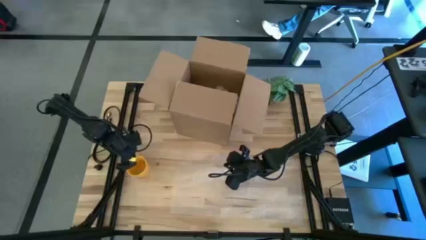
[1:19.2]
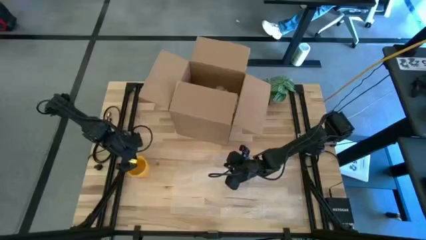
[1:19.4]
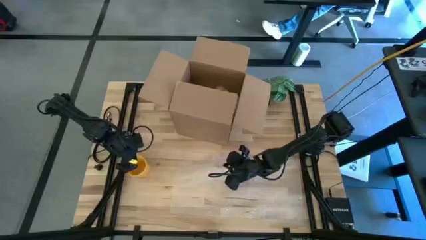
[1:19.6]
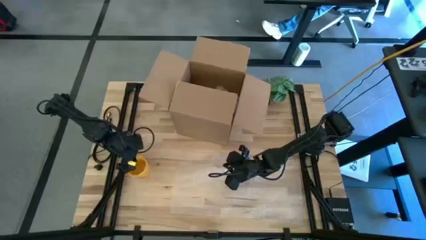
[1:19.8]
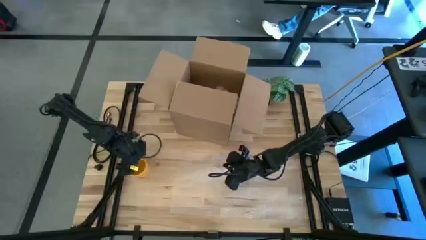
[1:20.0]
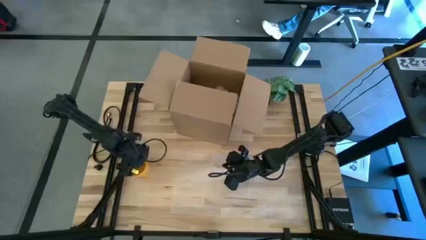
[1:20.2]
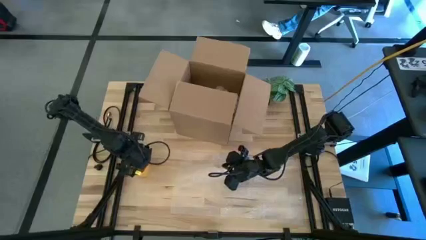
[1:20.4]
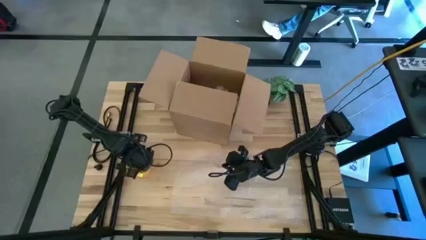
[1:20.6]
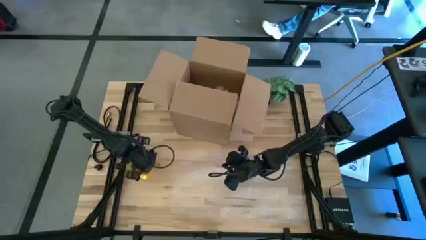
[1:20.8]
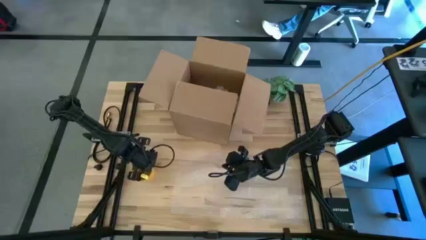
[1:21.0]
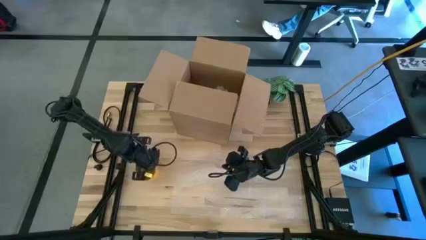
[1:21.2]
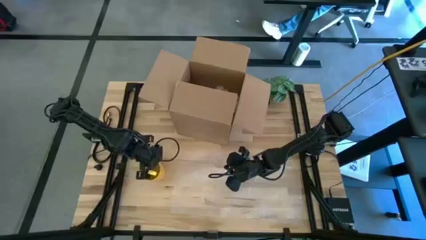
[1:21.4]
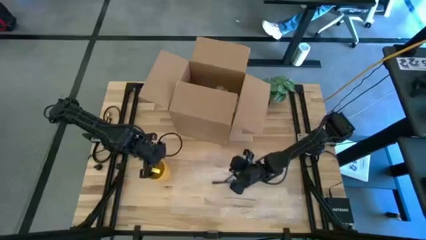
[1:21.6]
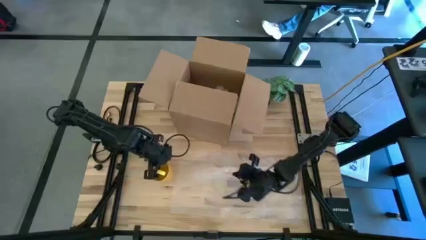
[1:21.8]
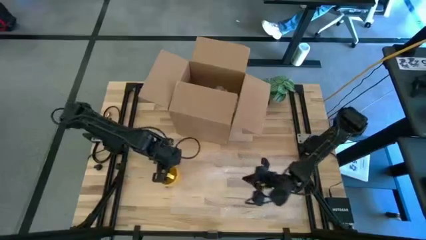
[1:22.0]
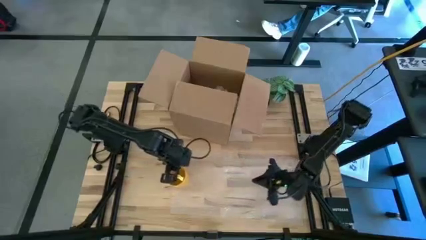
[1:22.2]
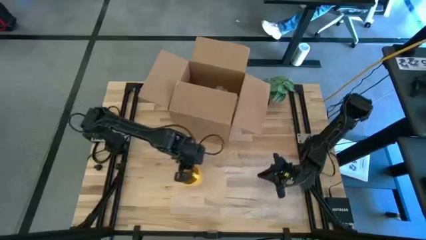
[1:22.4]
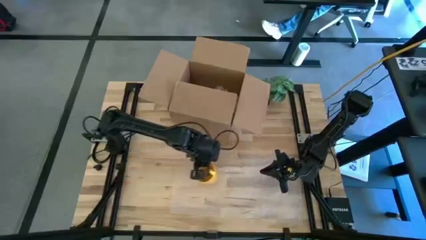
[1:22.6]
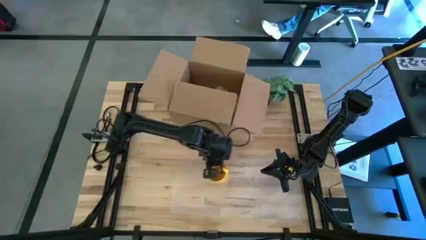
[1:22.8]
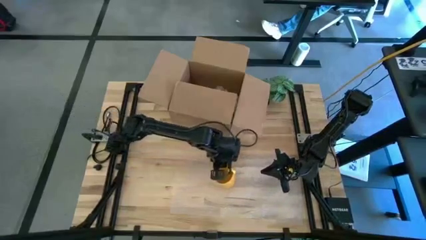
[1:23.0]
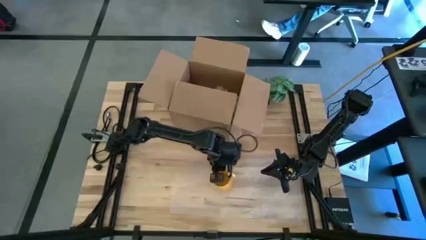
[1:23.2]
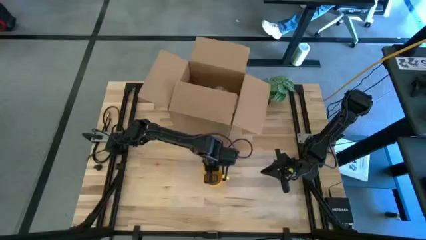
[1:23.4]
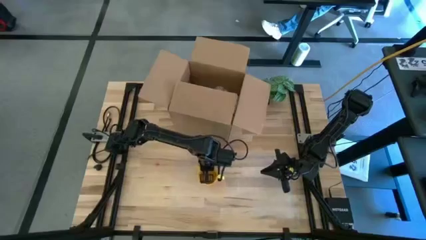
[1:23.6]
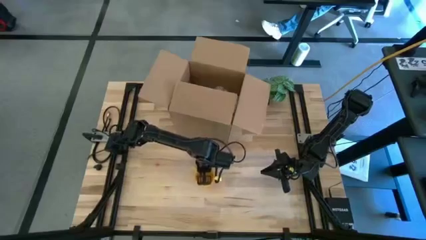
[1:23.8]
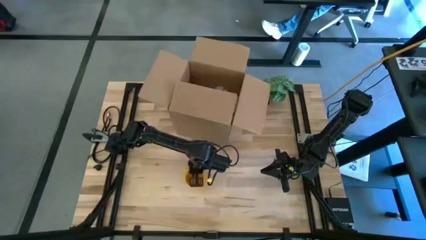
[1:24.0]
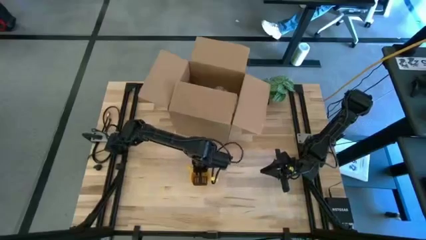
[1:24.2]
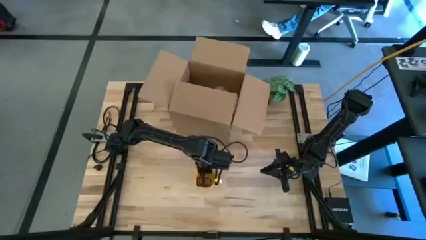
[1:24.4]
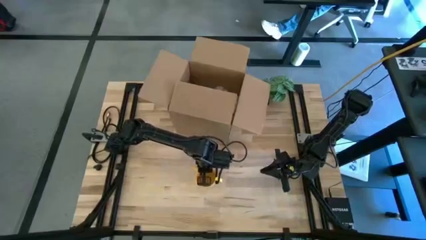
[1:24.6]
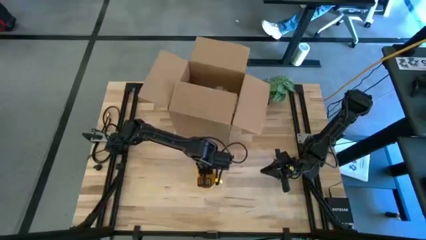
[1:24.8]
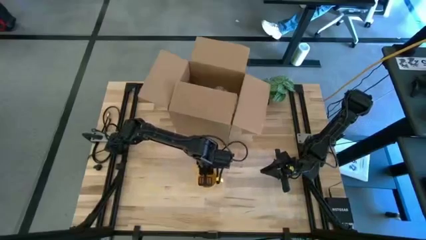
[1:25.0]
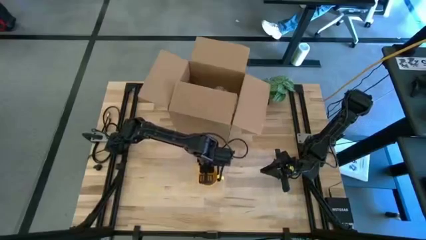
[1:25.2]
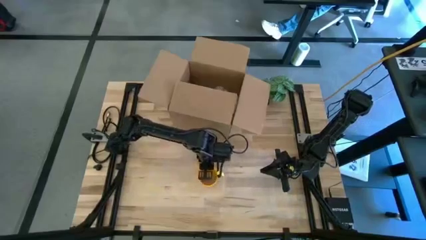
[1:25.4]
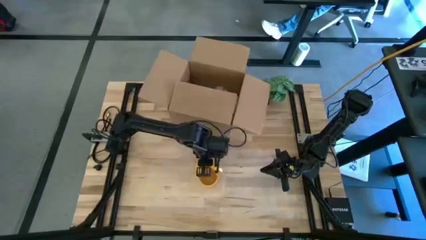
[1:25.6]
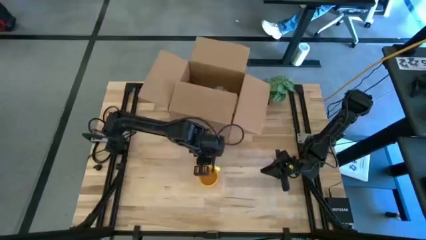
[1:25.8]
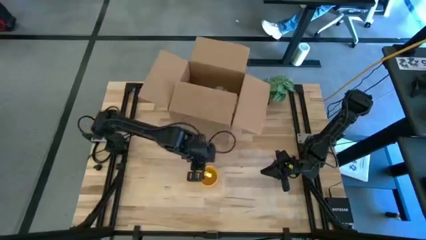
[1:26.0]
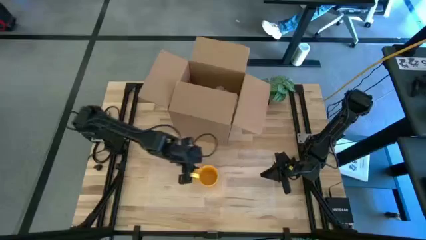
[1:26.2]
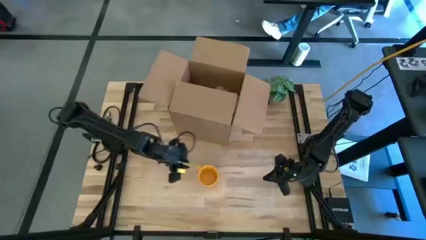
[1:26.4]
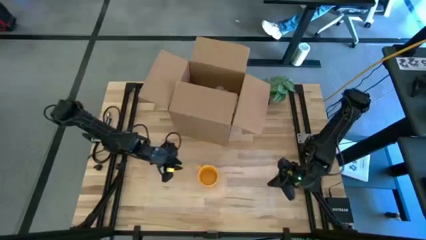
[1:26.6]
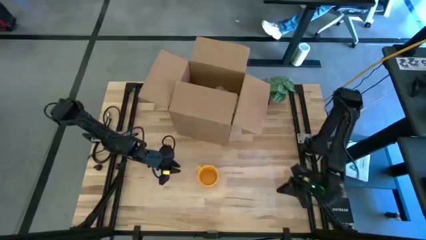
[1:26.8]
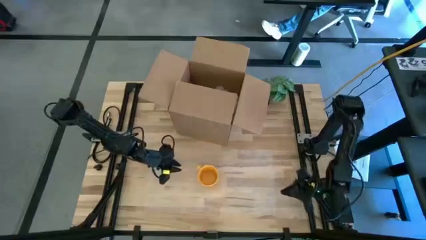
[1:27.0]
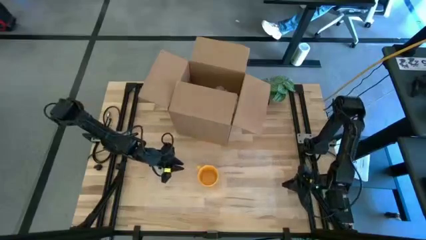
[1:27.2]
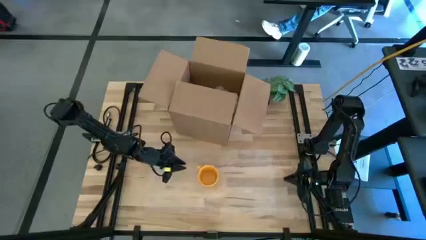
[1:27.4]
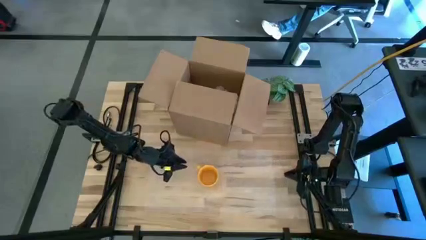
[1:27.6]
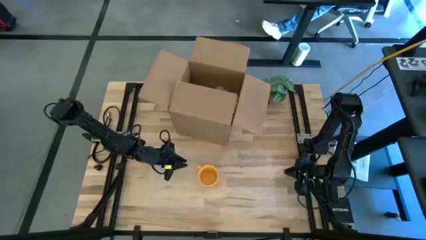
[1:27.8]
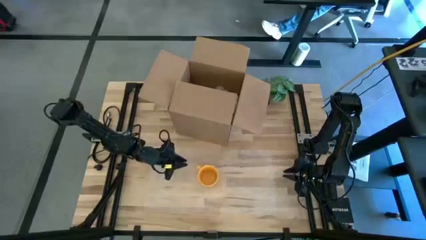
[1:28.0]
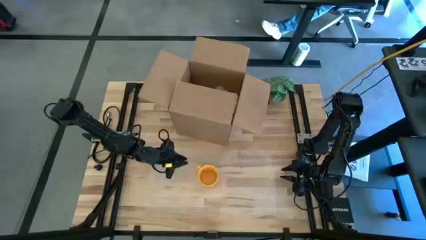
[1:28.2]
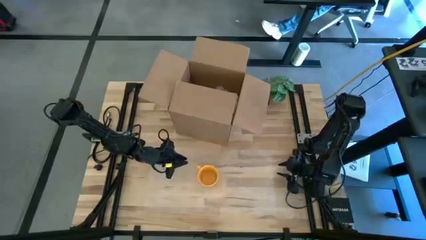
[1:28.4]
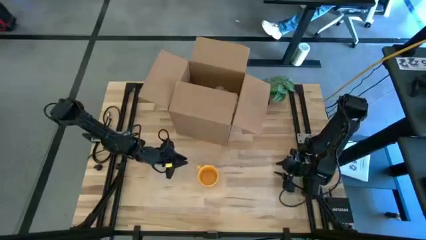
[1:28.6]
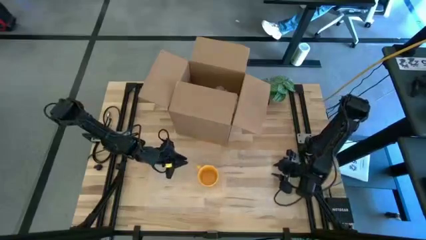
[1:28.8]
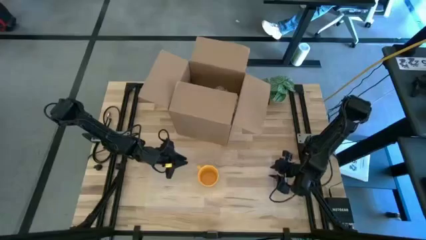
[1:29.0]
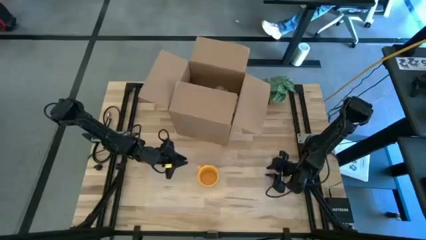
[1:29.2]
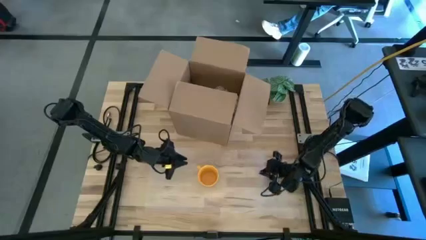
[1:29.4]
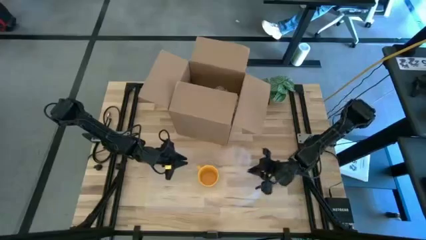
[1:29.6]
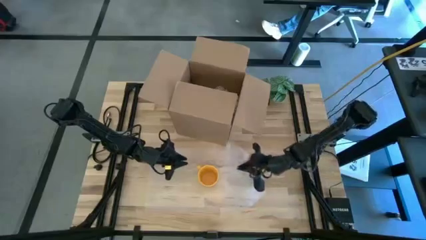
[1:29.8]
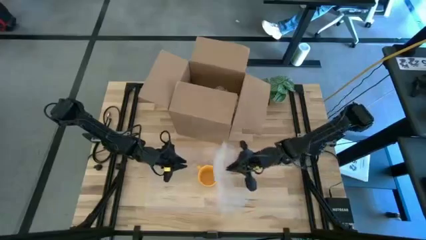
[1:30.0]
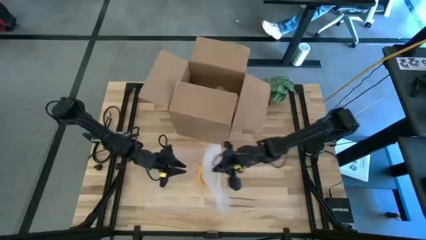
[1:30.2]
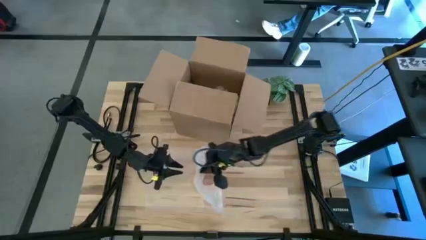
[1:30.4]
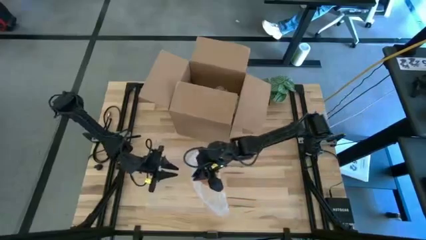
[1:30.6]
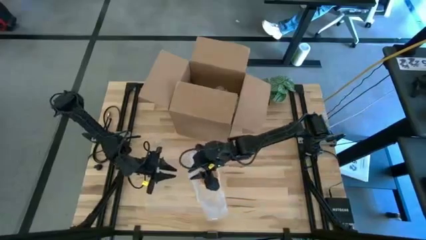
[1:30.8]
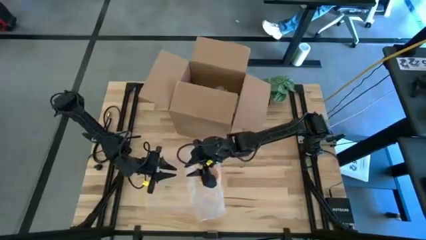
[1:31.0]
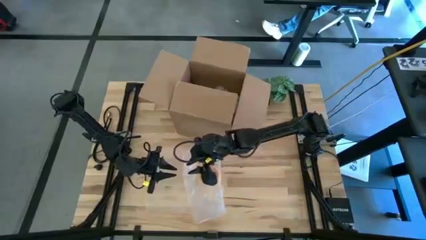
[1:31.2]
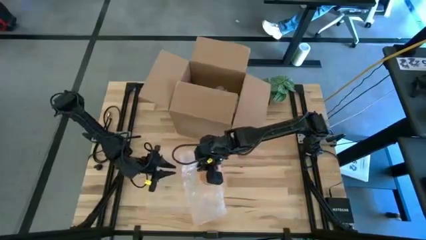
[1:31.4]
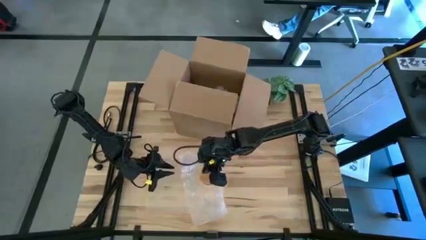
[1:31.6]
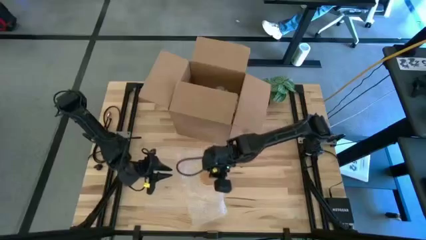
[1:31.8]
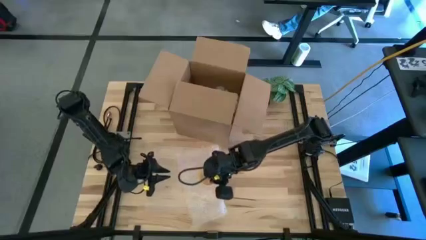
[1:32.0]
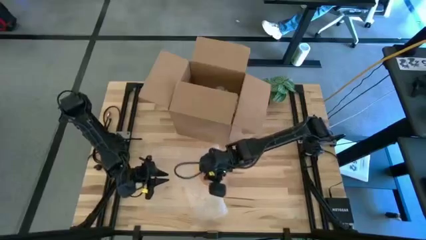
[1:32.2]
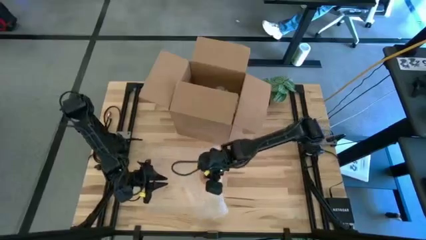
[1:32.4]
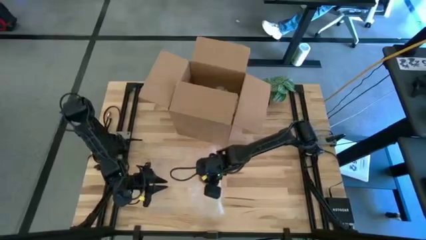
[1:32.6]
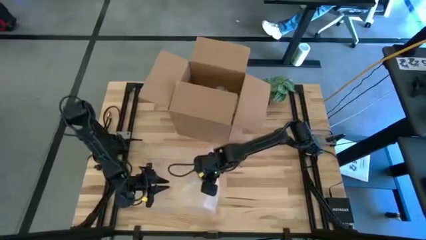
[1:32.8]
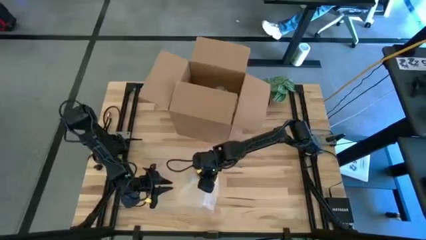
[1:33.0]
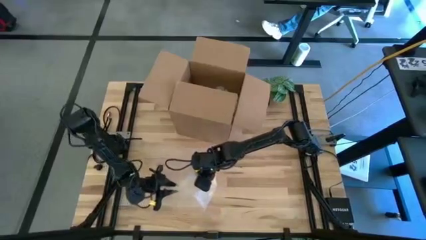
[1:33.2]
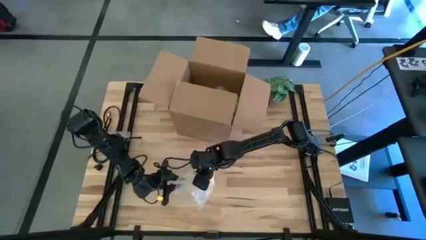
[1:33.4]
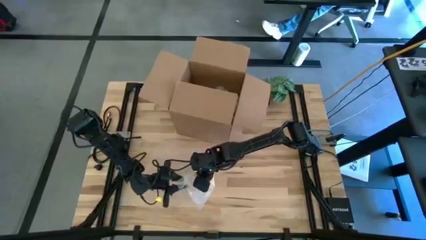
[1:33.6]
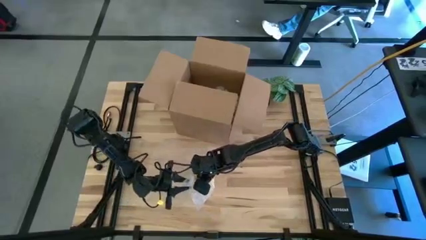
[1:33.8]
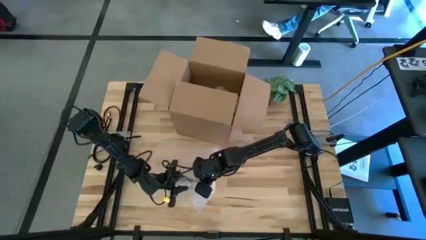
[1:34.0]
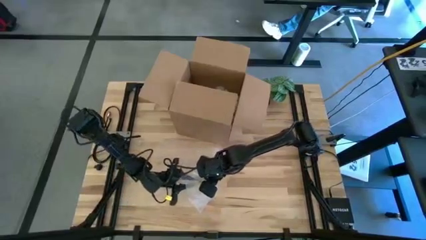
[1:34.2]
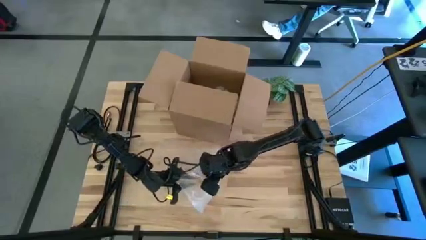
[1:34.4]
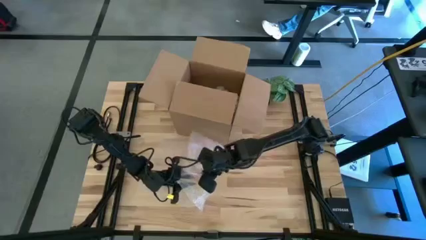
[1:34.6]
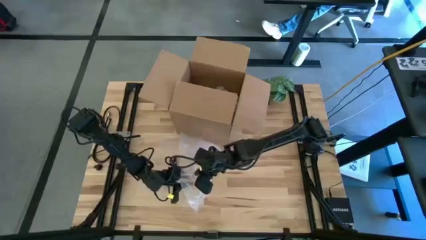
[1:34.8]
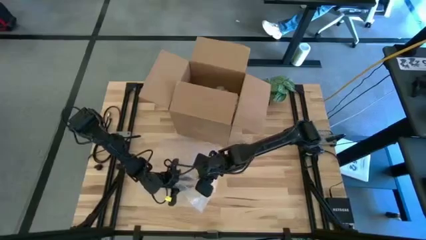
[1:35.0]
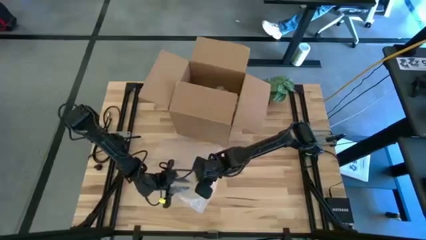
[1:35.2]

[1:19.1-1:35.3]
Task: wrap mug
Wrap the yellow mug with the bubble wrap
